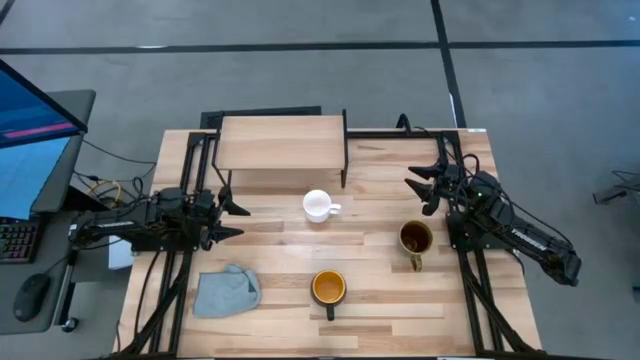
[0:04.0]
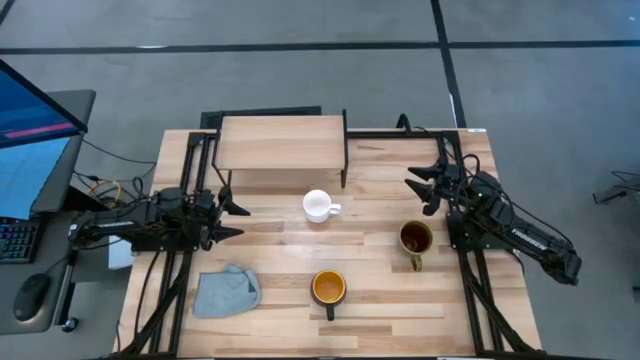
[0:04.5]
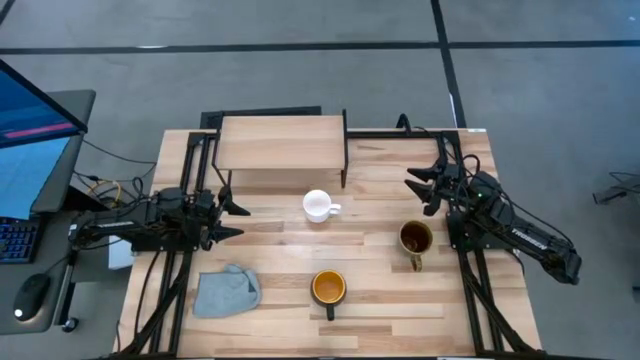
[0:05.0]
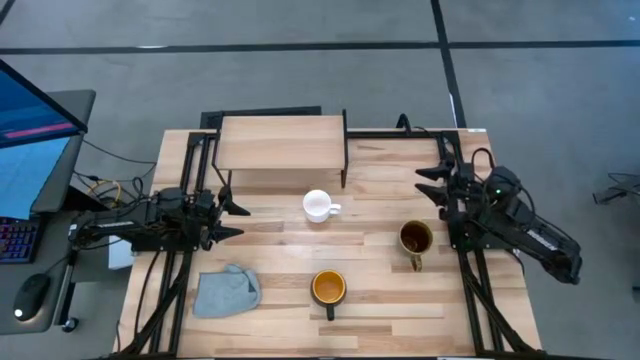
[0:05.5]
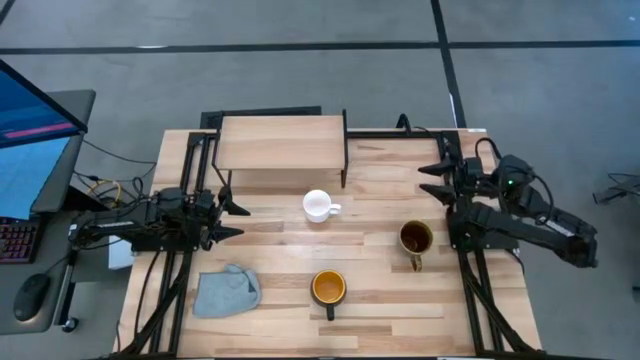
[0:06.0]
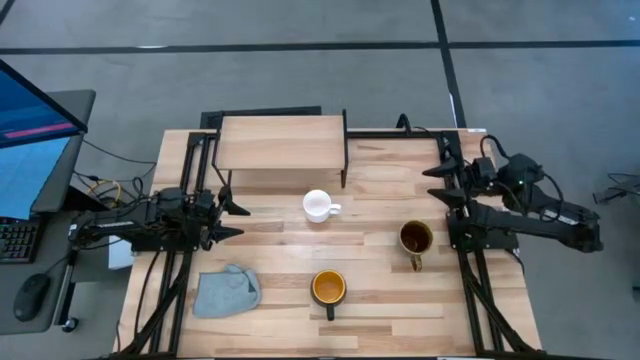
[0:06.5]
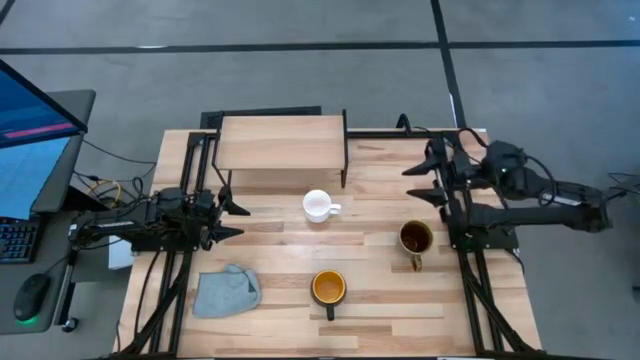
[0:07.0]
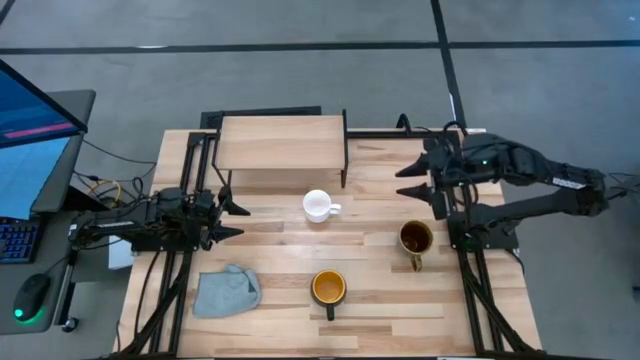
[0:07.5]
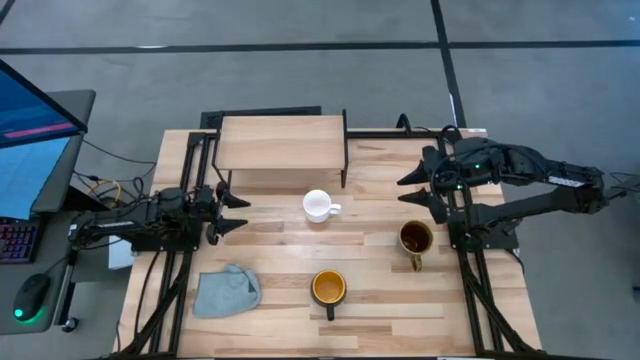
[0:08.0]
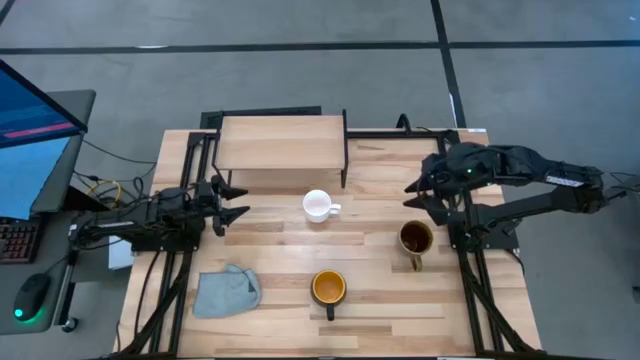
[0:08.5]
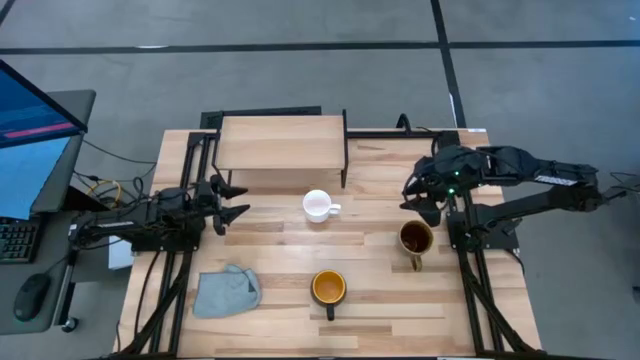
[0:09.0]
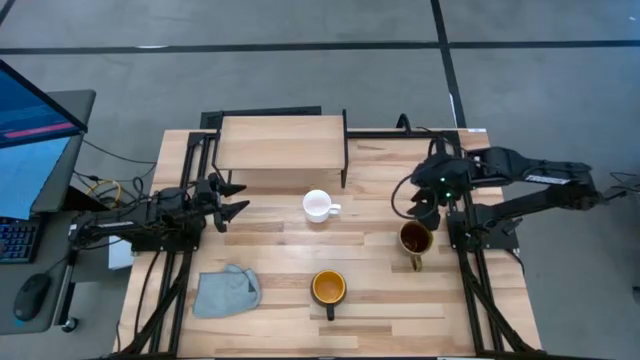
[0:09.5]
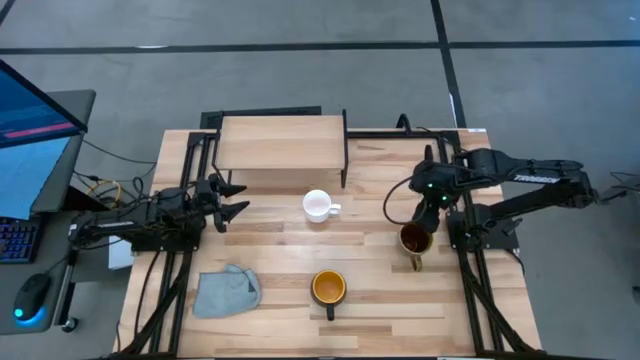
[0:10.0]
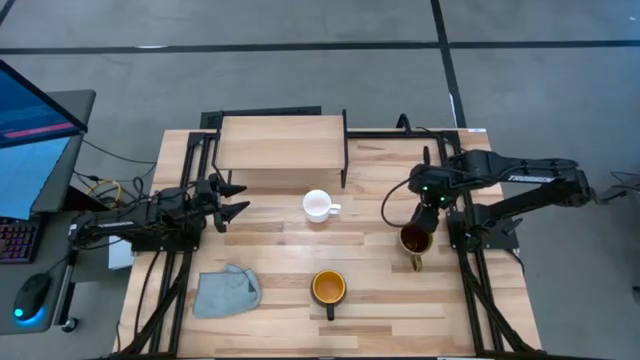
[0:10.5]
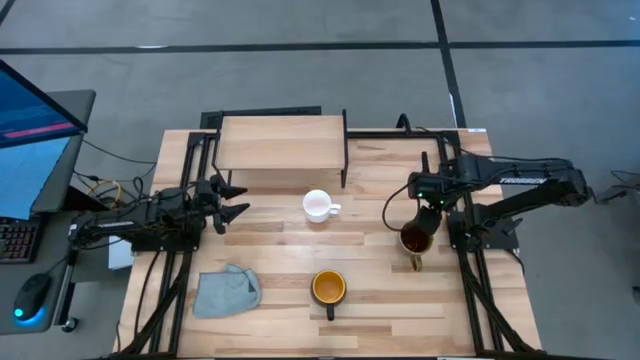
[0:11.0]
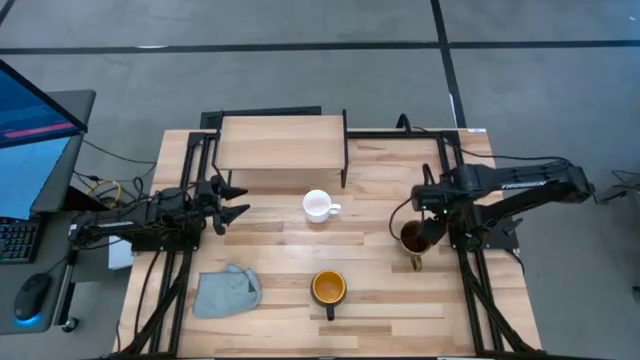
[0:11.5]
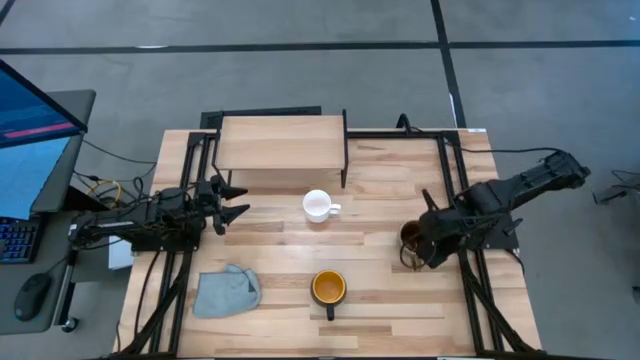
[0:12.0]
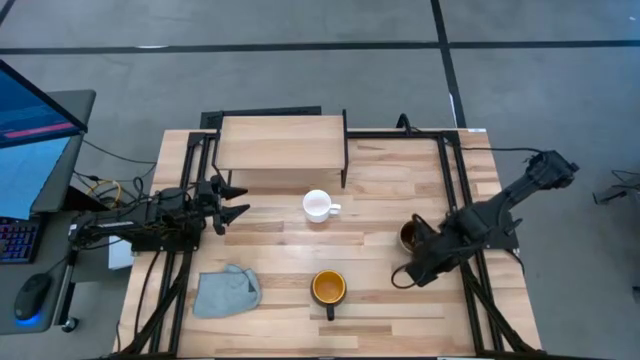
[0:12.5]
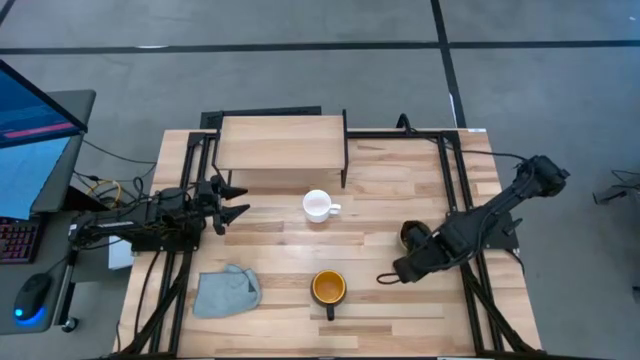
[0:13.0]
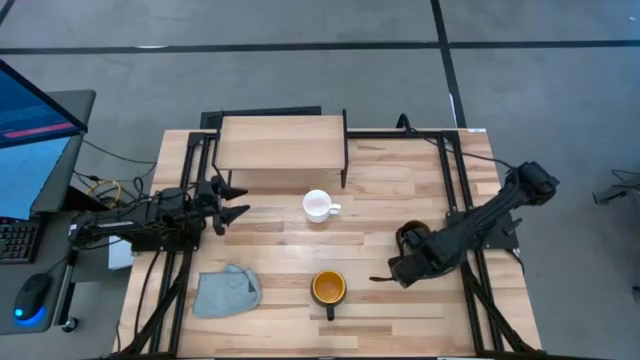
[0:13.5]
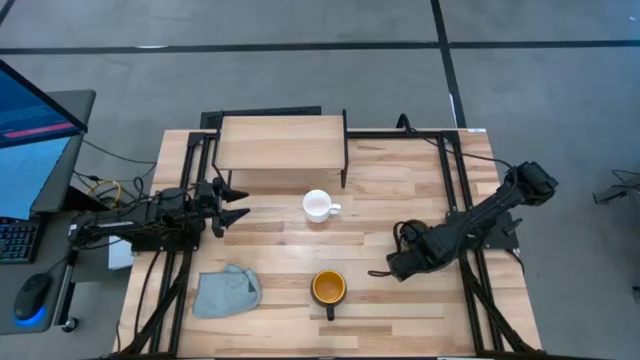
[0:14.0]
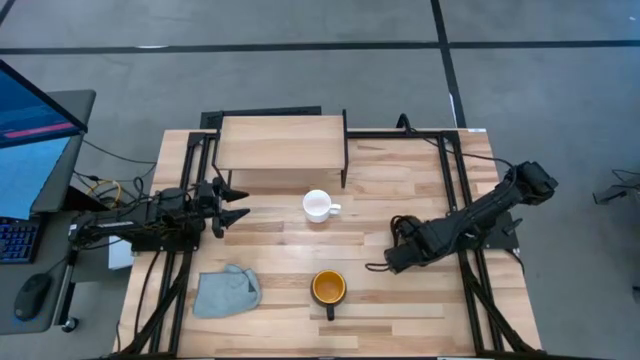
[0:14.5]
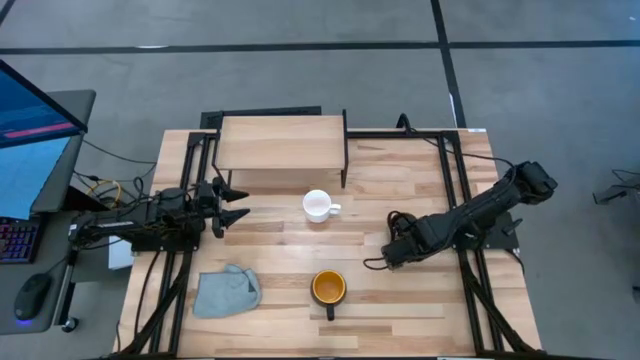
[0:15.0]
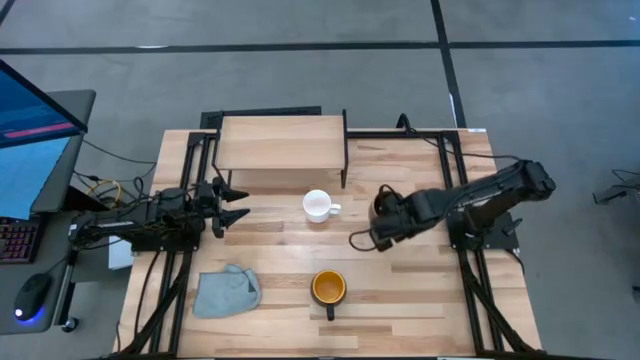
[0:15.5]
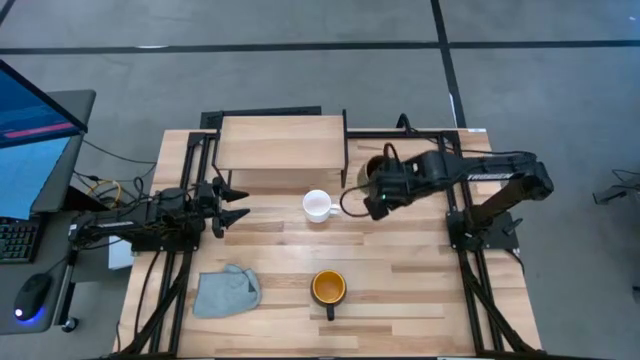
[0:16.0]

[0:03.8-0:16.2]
Task: Stack small to large cups/mugs on shelf
Put the brown green mug on the shelf

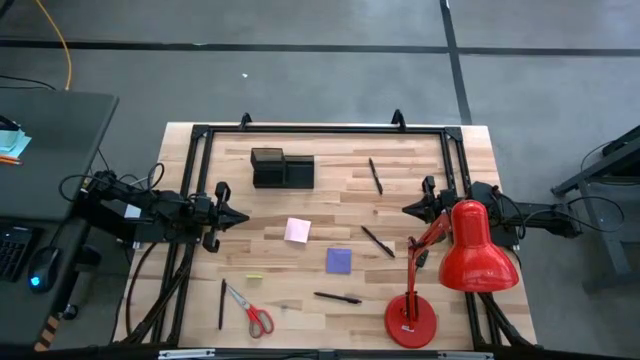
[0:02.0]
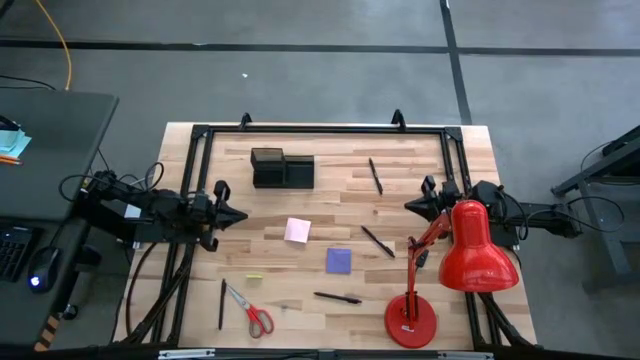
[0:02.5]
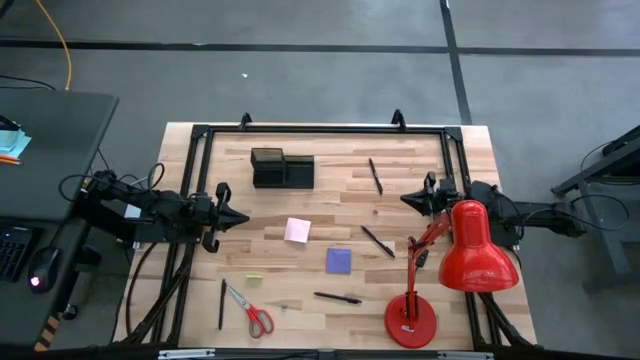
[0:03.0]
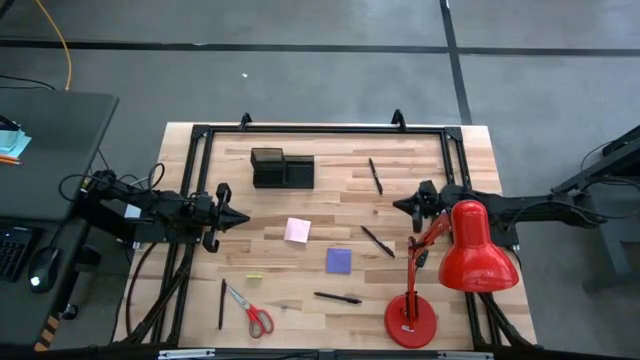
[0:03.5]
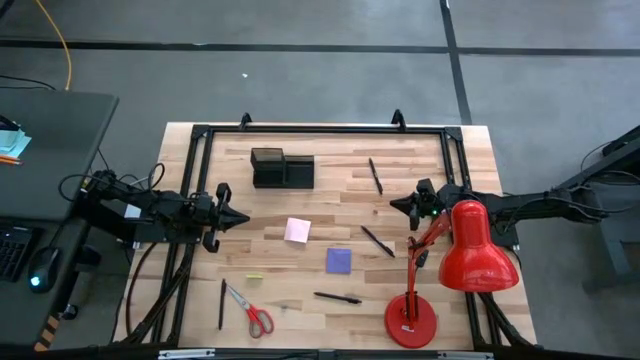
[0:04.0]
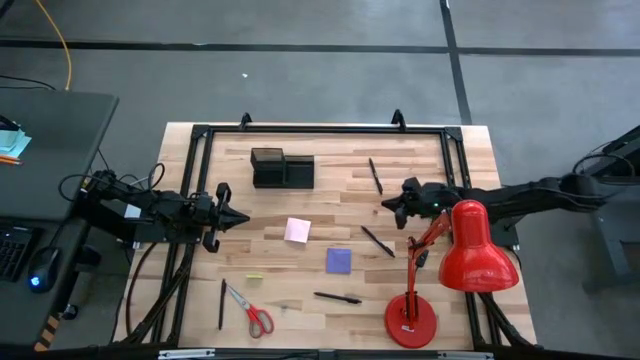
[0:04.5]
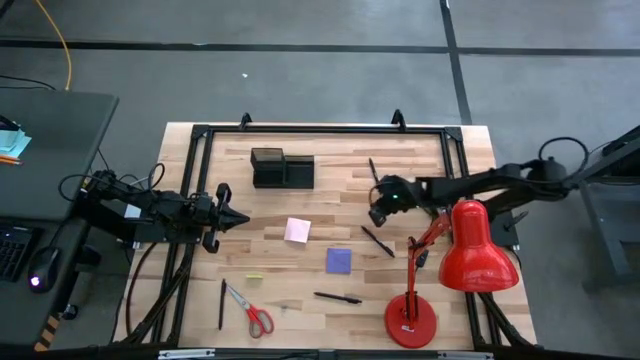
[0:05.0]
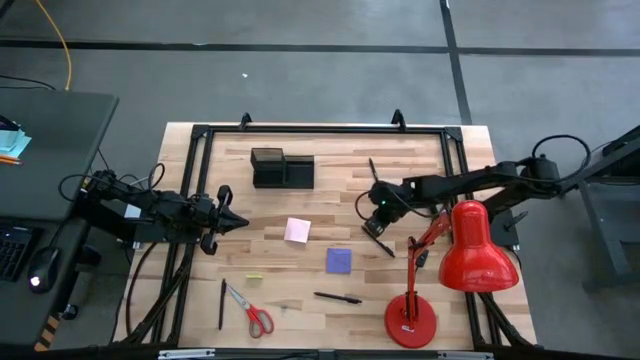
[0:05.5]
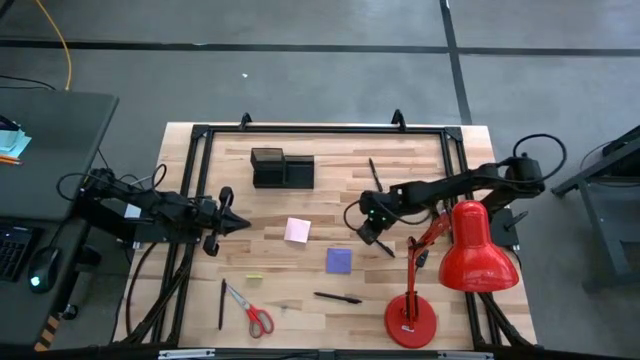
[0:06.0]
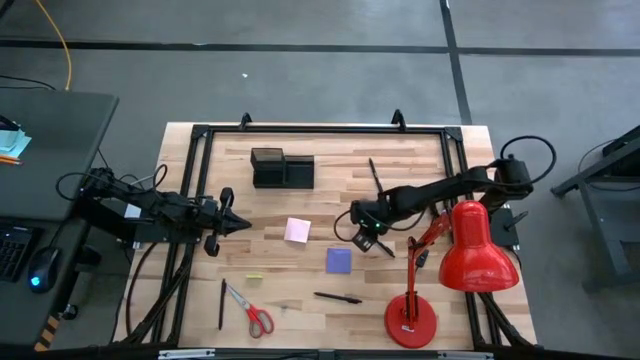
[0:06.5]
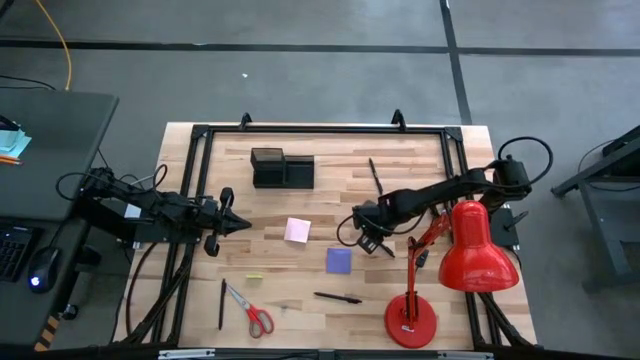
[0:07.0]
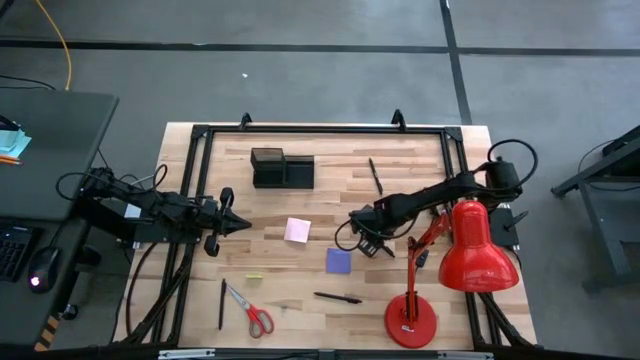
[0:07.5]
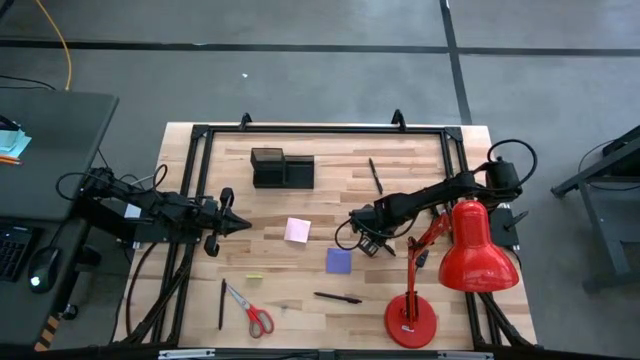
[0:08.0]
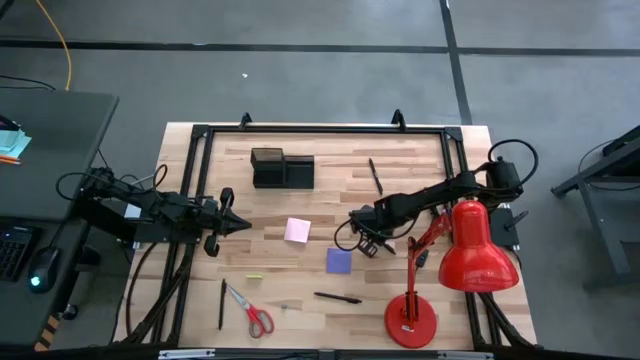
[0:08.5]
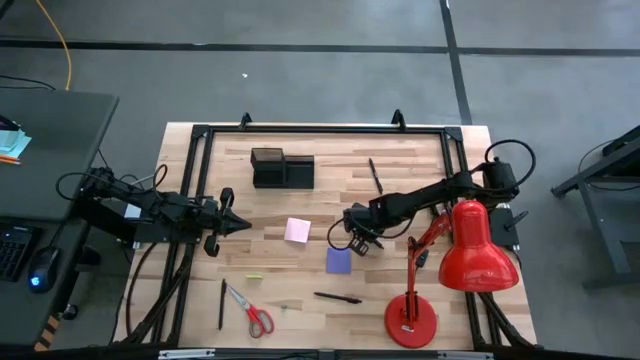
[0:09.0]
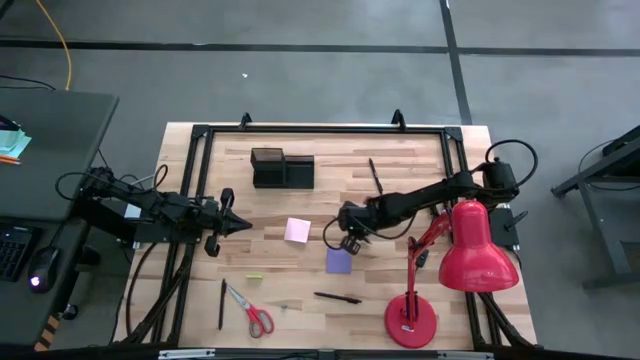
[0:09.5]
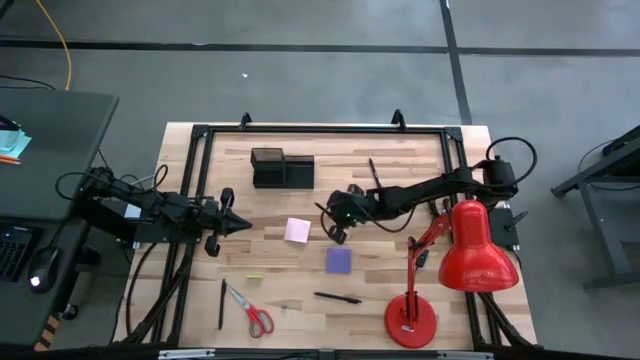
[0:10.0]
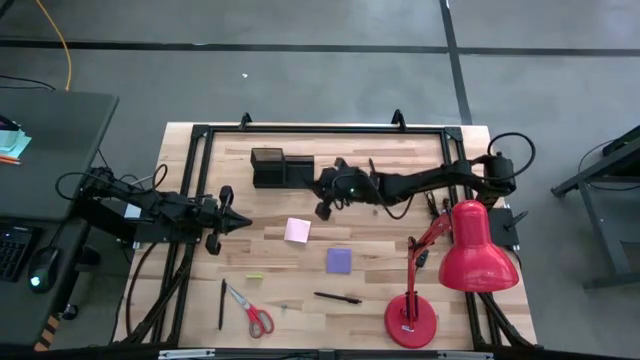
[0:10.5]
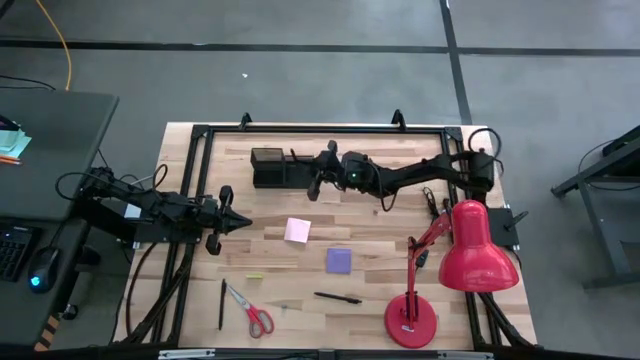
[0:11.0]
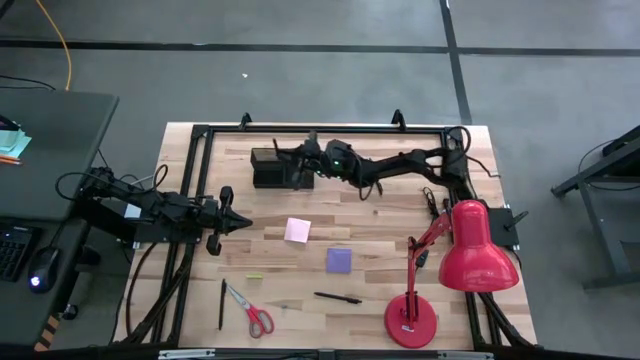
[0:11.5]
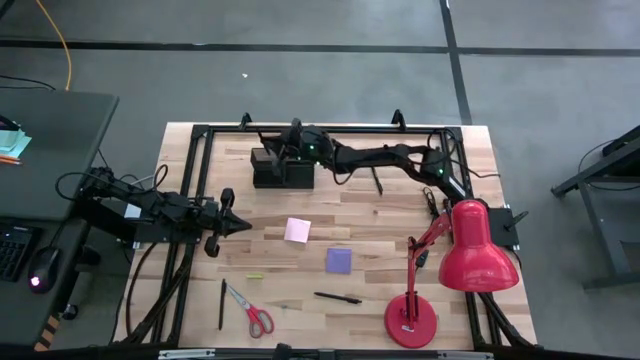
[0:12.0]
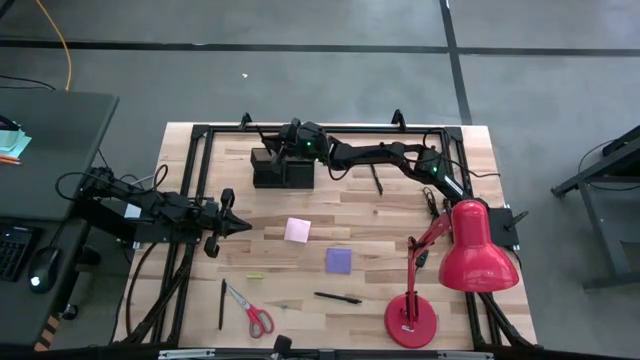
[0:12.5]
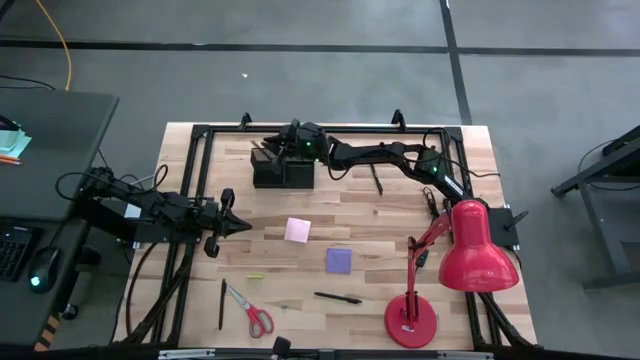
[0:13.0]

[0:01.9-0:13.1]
Task: Pick and place office supplies into organizer
Put the black pen into the black desk organizer
